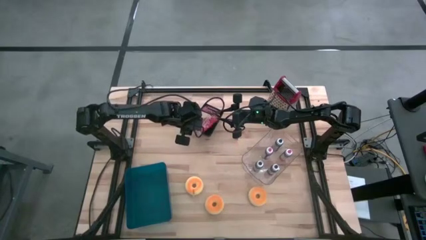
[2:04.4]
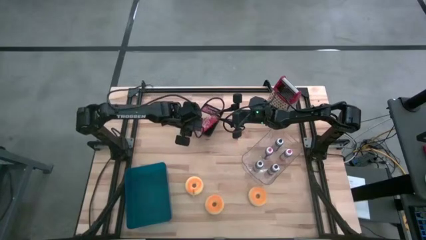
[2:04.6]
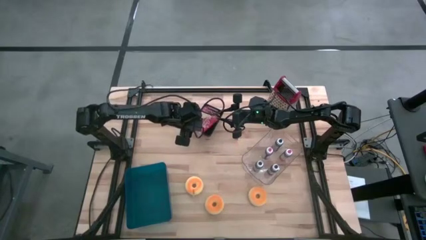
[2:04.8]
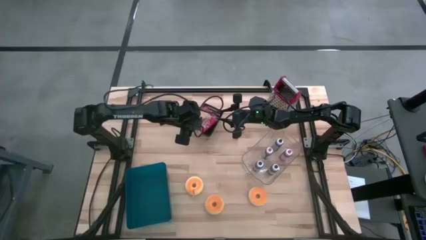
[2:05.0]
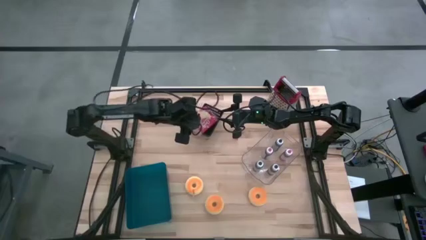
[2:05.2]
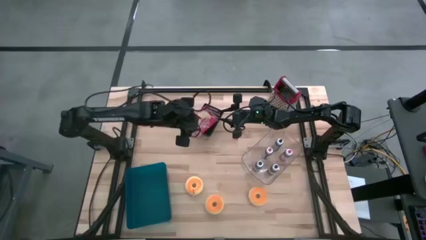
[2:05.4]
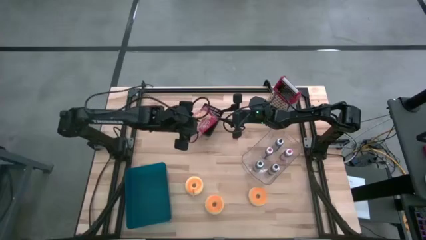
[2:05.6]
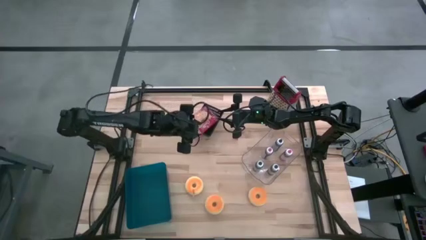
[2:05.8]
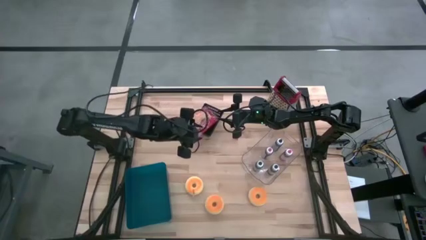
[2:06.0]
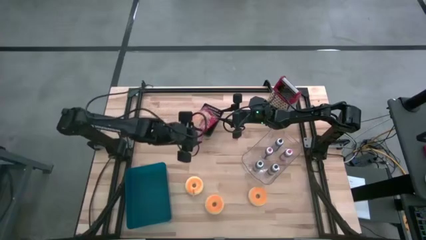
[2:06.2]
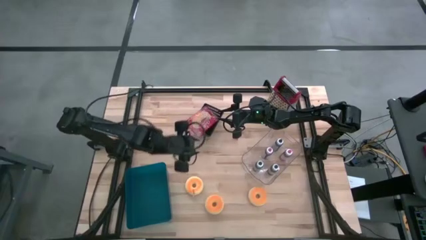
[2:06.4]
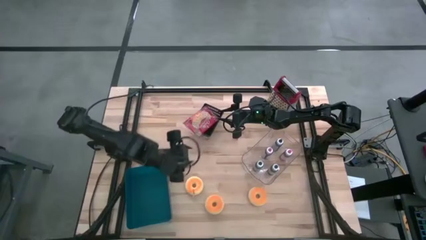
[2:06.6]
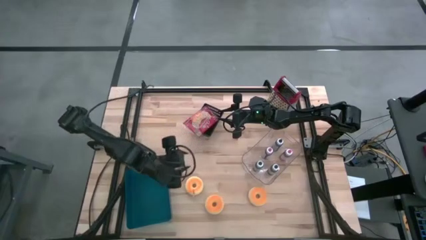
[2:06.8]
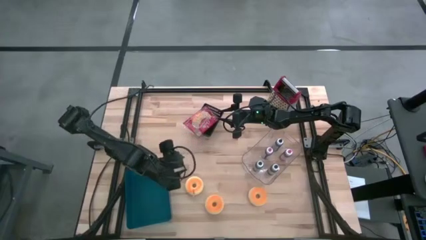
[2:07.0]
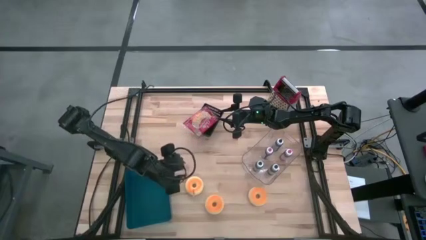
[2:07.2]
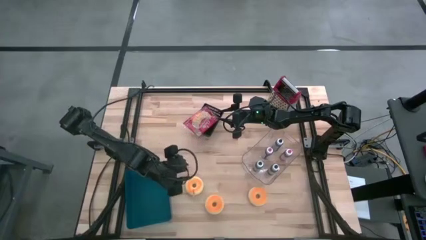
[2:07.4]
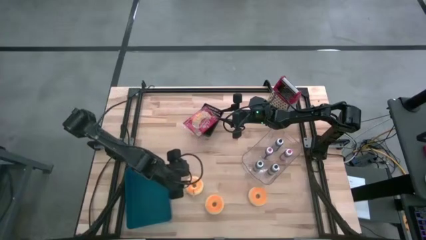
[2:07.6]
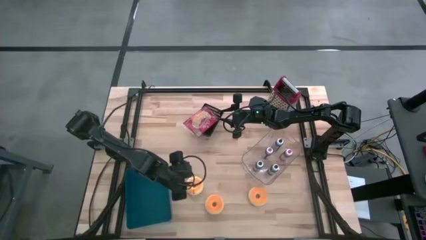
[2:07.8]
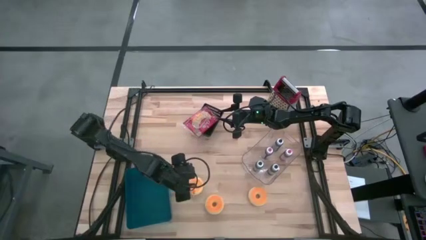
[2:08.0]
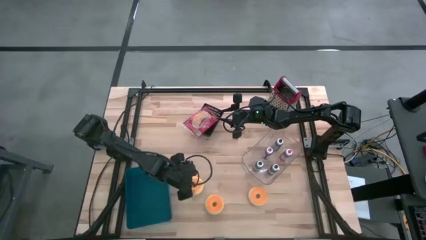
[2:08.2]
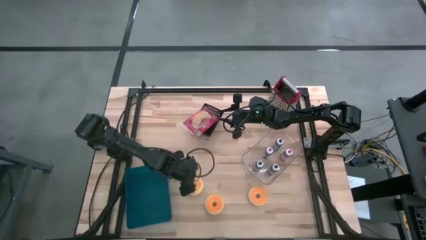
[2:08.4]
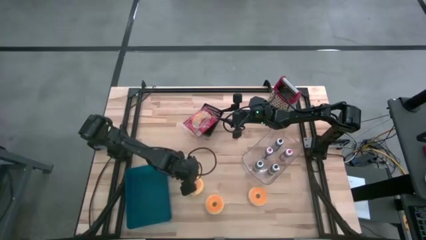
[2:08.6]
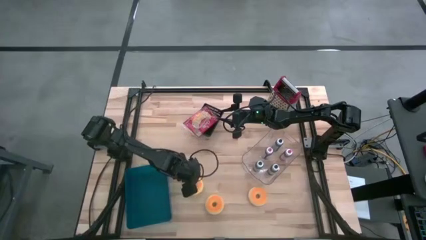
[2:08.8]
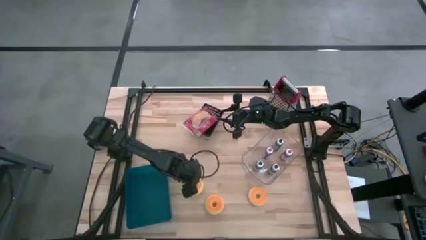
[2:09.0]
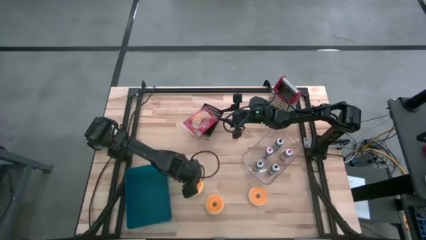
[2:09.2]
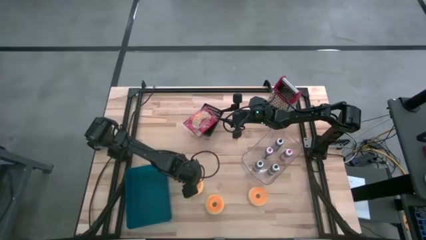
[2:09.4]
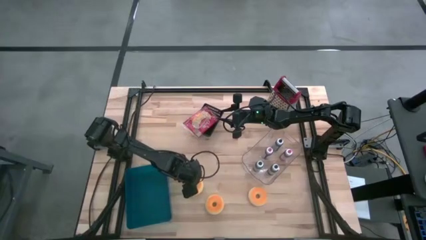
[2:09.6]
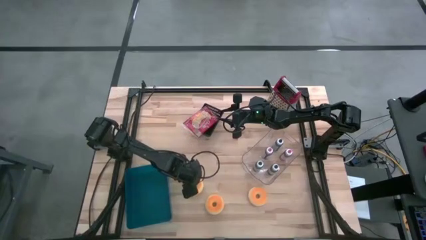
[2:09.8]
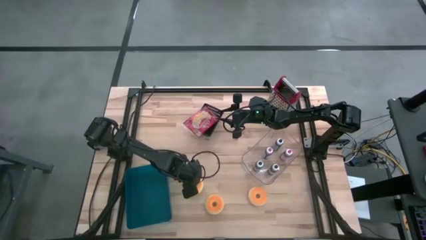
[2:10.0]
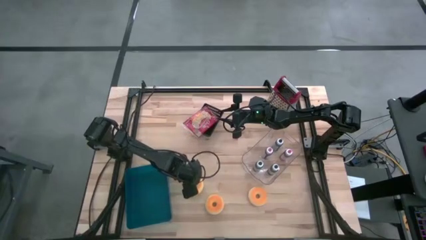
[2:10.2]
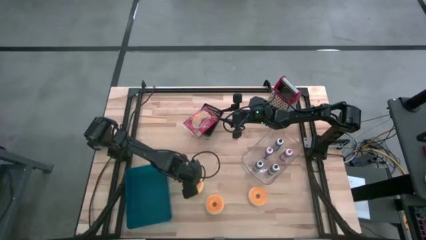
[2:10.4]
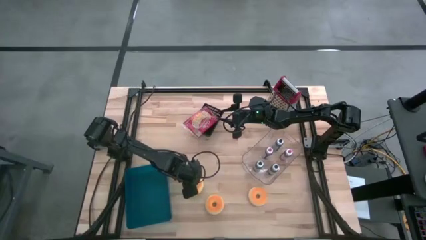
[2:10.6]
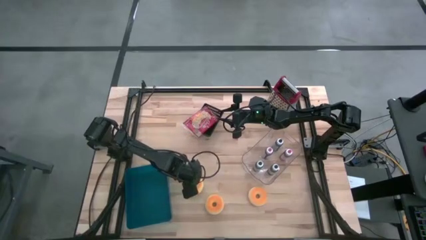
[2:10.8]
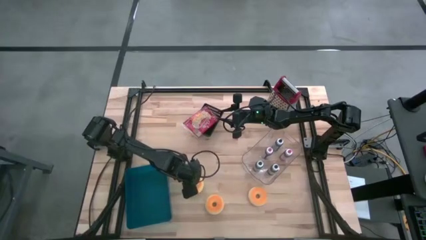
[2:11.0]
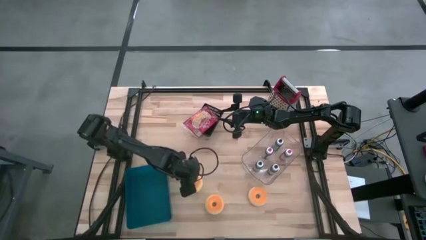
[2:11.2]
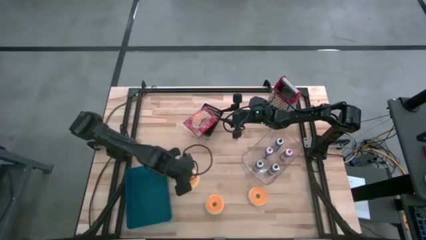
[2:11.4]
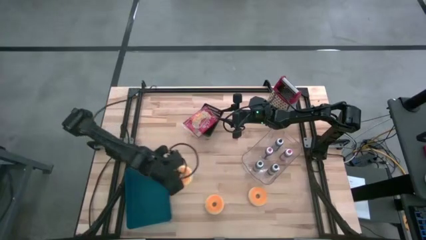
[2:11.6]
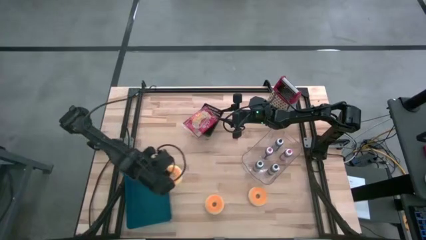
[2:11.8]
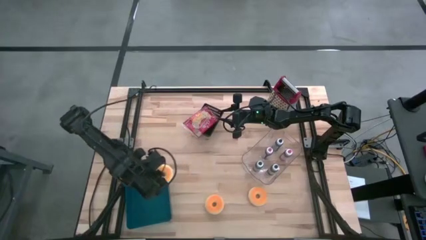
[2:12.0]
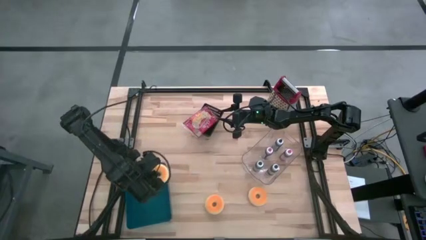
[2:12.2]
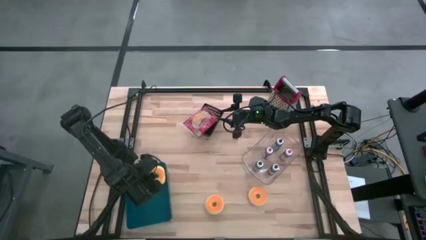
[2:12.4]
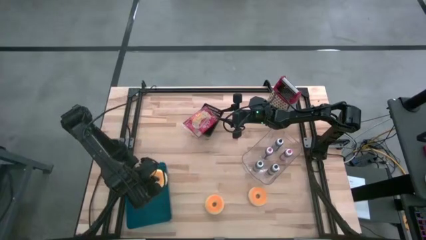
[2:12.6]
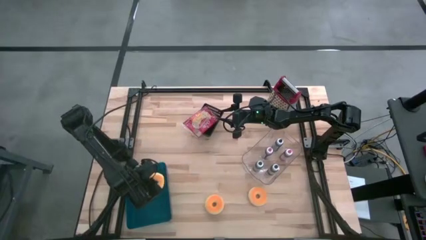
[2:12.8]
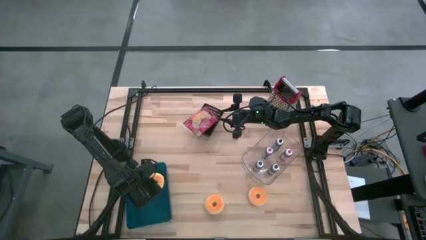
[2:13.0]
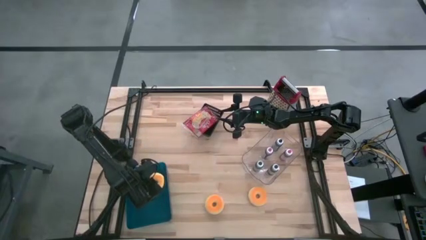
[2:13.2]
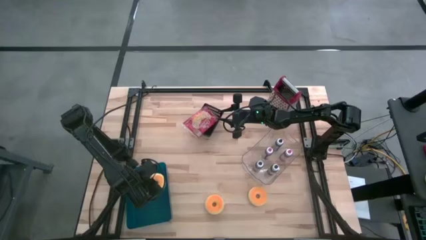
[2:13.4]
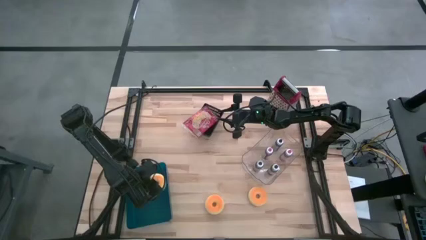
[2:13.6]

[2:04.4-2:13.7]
Task: Pick & Place Food Item
Put the left yellow donut into the blue bin

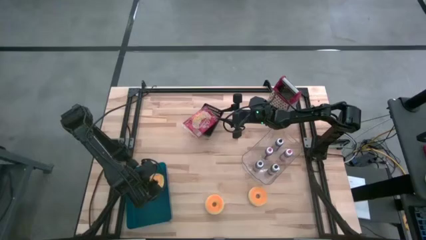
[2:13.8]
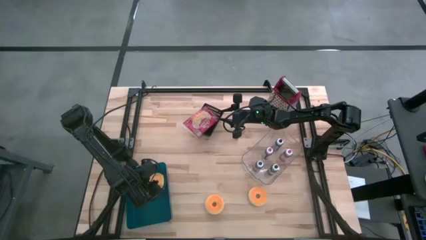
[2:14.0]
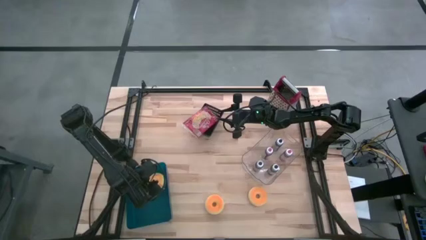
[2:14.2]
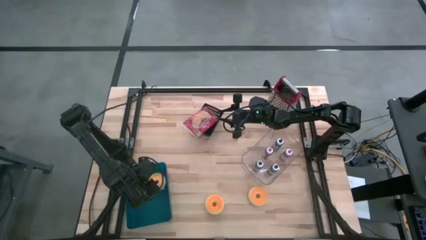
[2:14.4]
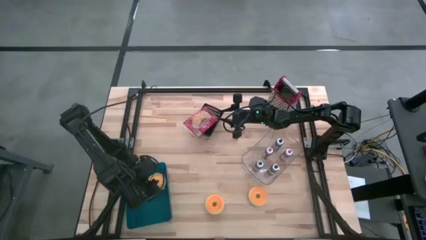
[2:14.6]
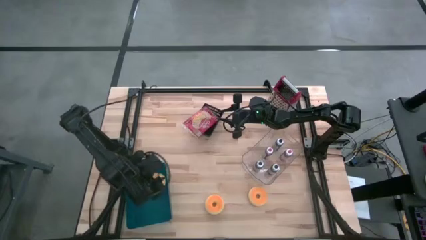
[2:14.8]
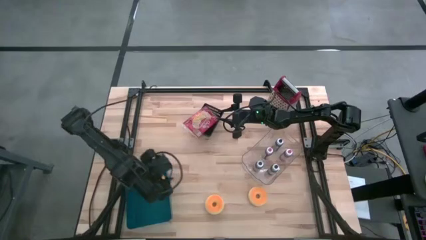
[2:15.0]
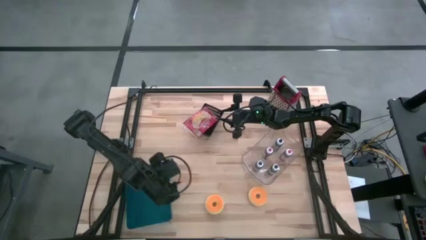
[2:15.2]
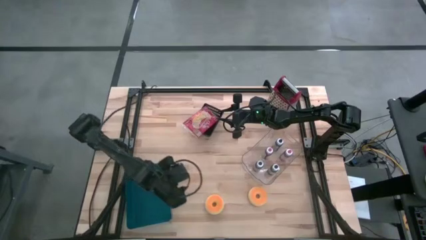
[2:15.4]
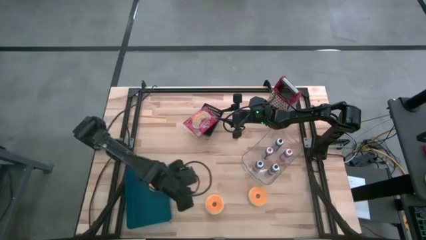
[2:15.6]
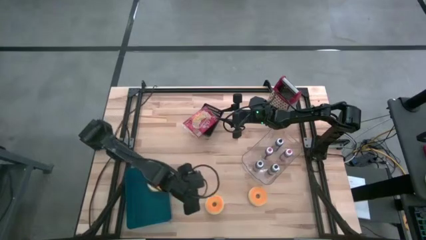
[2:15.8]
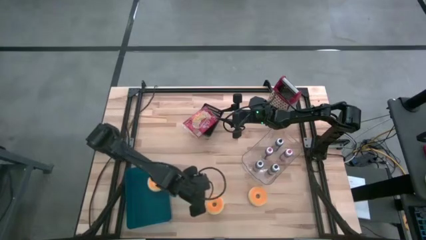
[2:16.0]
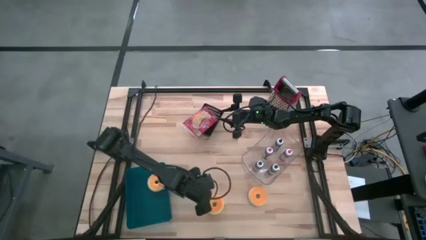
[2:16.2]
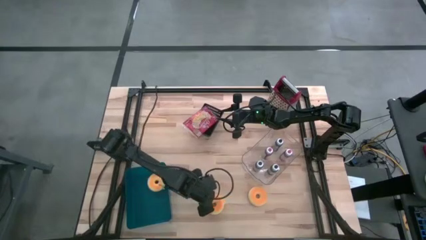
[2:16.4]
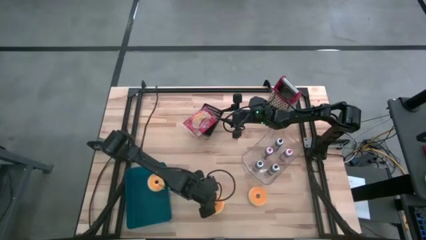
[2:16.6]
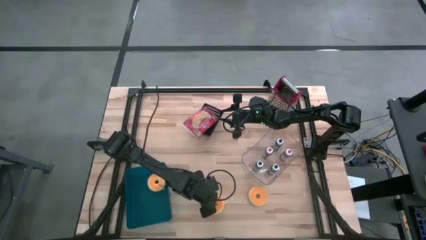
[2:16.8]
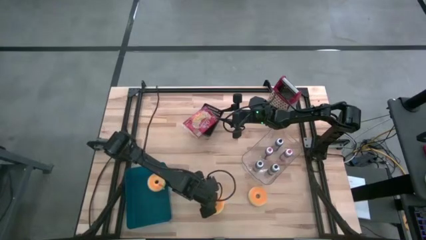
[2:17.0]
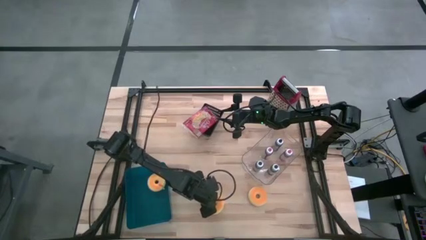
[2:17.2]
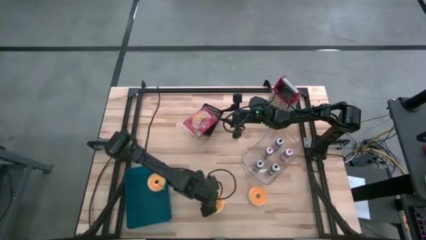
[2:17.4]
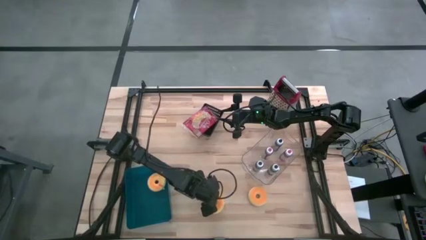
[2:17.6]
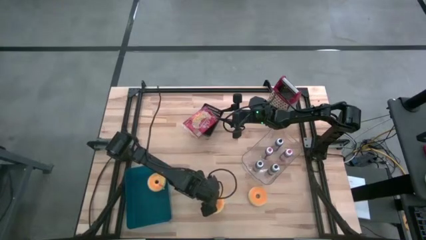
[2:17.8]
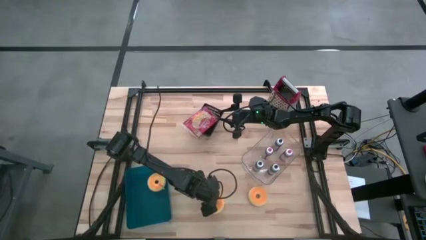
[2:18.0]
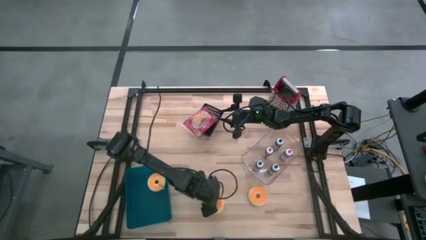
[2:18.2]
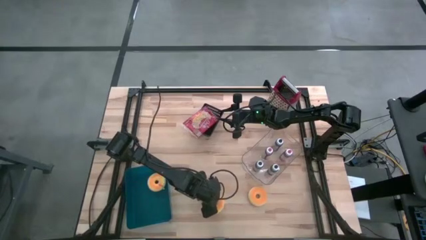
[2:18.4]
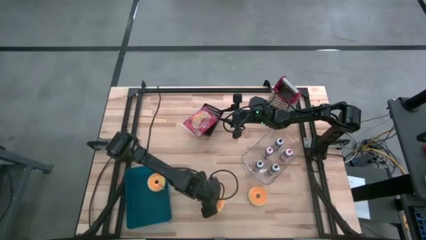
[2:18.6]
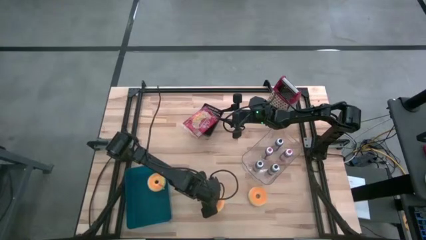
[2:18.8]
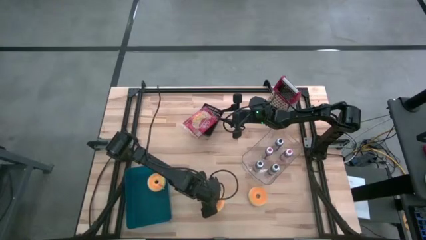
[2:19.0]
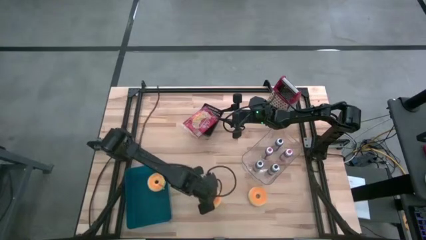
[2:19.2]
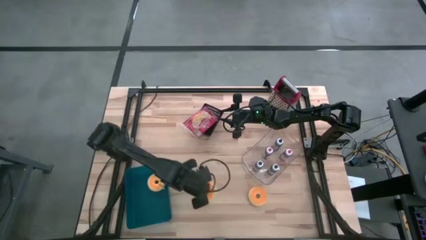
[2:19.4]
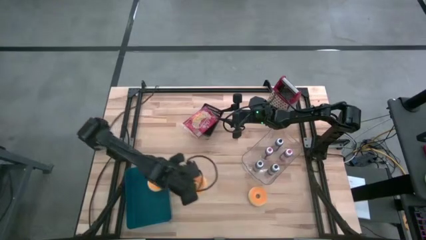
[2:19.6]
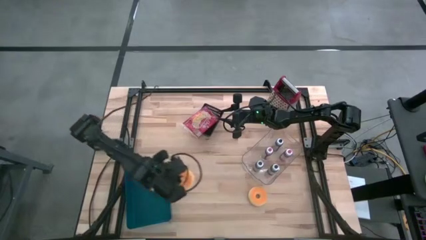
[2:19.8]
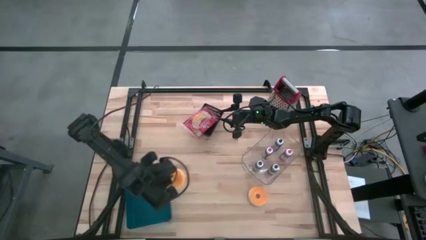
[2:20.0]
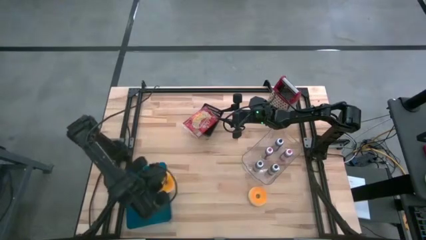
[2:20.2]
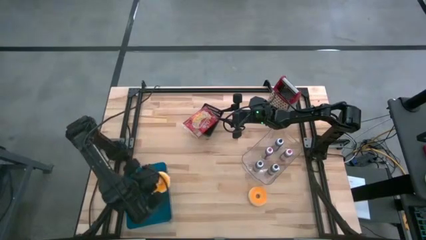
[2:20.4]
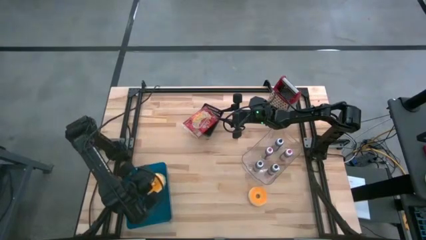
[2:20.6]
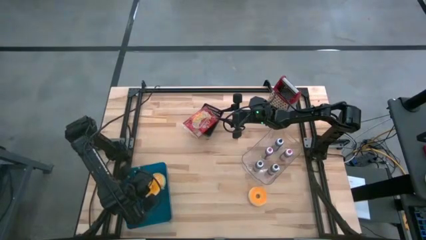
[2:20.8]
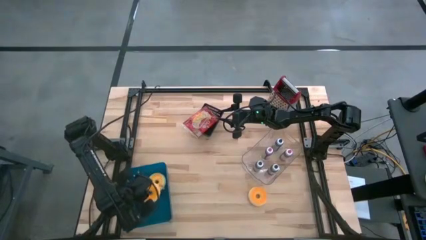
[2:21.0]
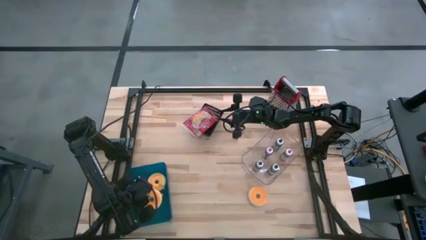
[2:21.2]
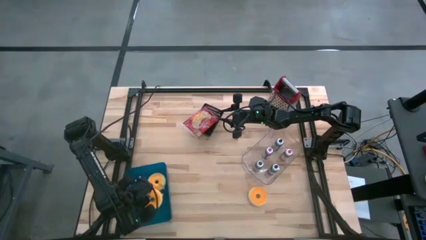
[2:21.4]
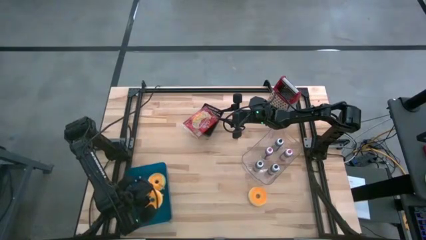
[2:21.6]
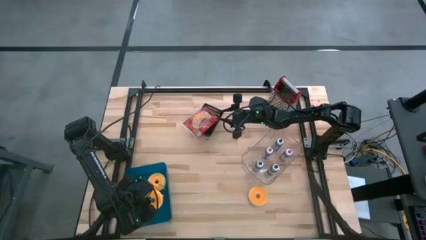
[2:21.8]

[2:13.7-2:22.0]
Put the left yellow donut into the blue bin
